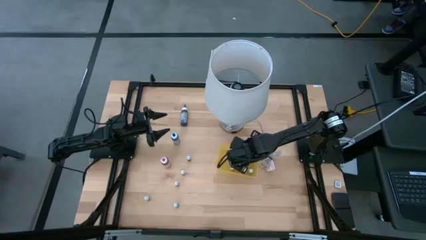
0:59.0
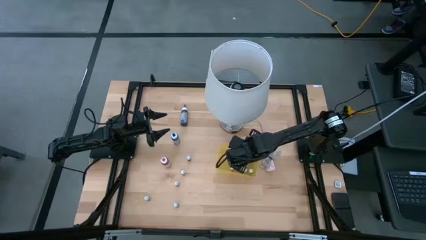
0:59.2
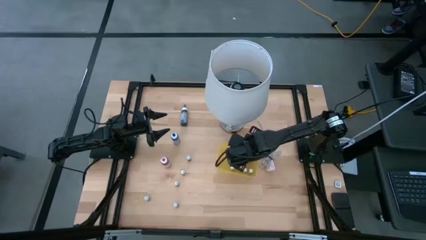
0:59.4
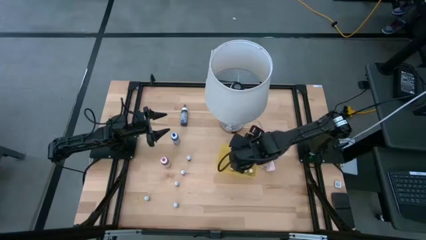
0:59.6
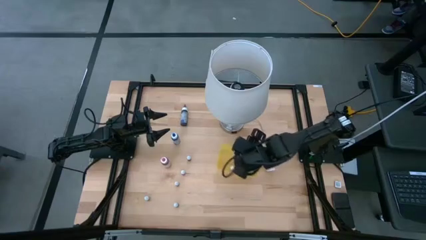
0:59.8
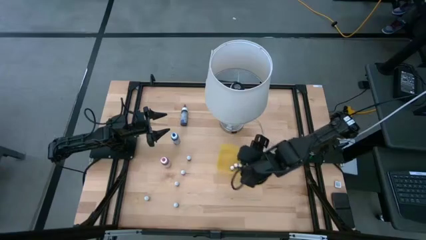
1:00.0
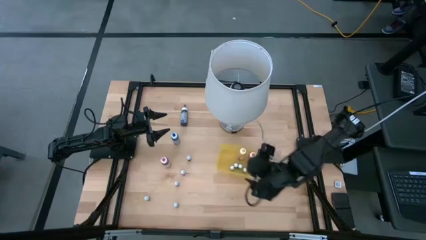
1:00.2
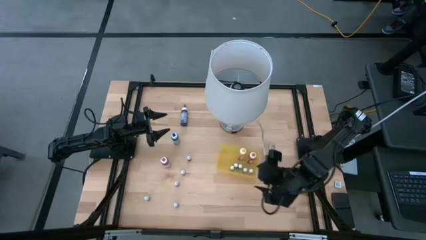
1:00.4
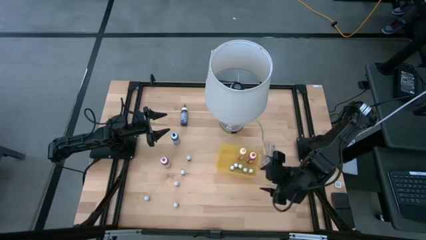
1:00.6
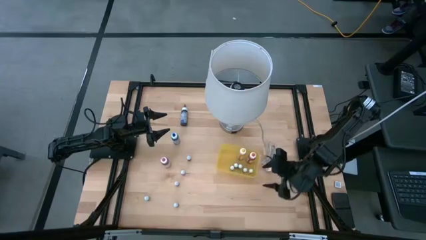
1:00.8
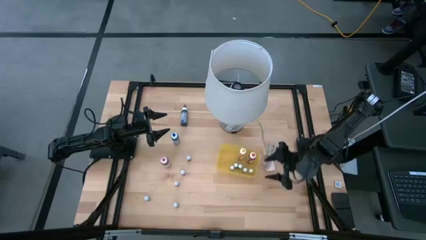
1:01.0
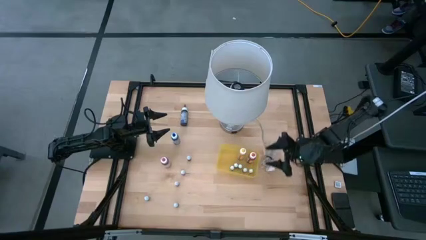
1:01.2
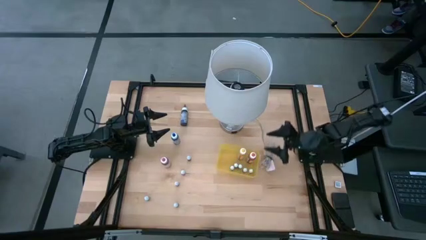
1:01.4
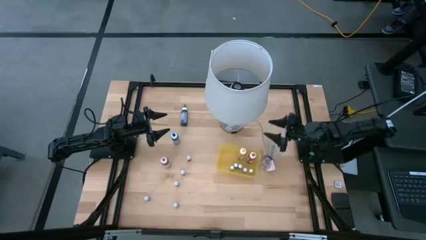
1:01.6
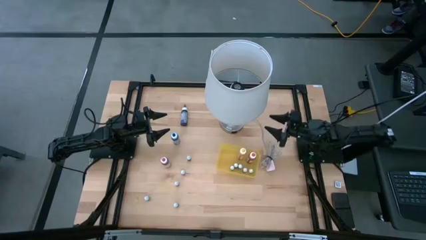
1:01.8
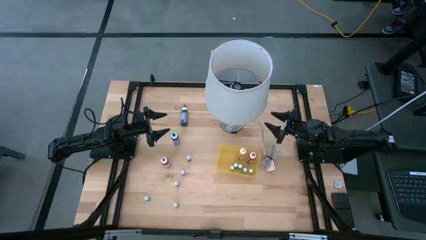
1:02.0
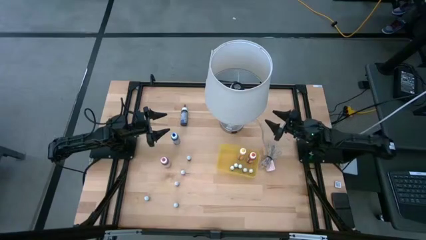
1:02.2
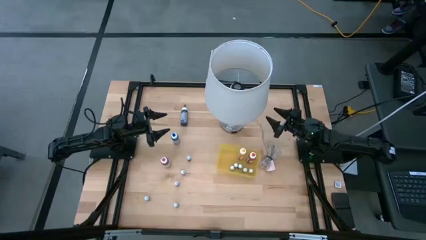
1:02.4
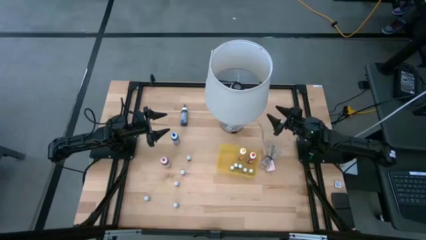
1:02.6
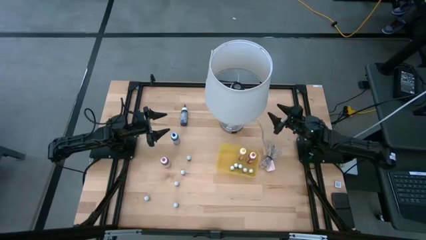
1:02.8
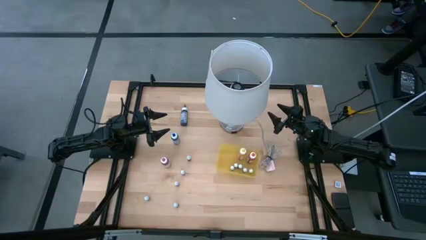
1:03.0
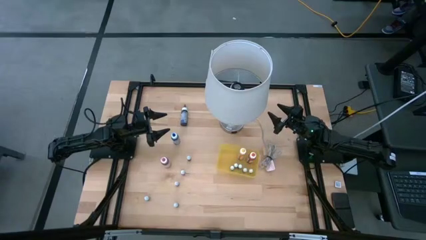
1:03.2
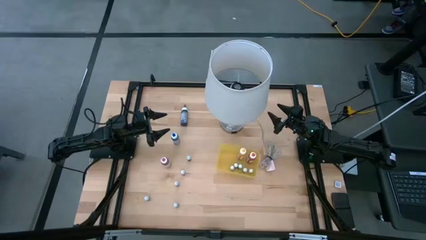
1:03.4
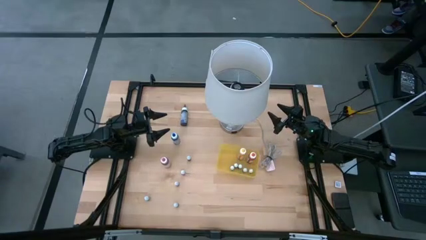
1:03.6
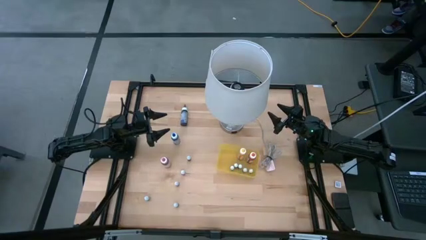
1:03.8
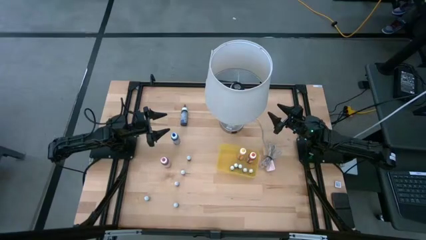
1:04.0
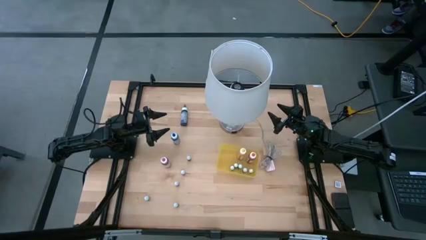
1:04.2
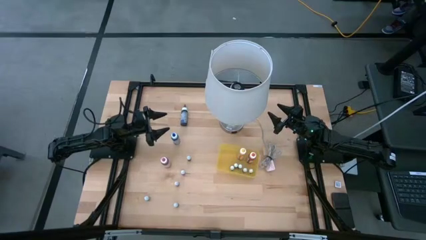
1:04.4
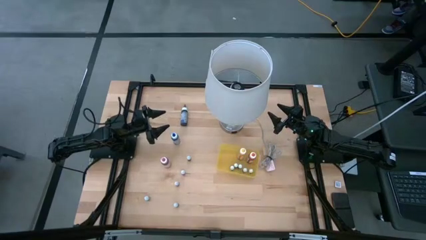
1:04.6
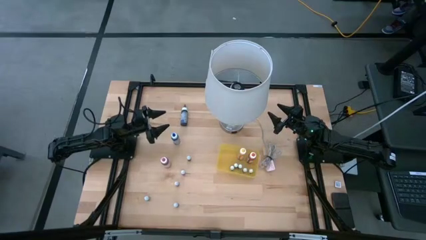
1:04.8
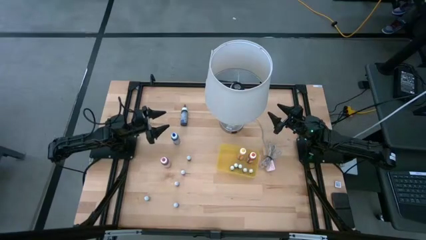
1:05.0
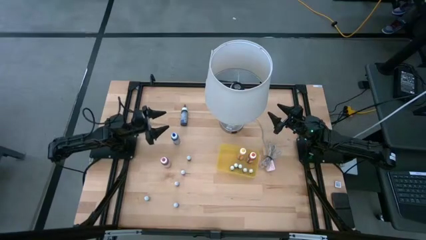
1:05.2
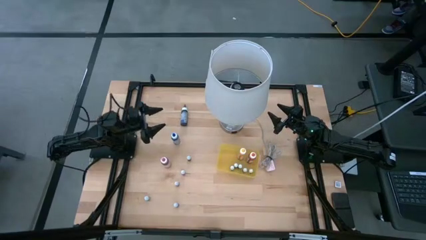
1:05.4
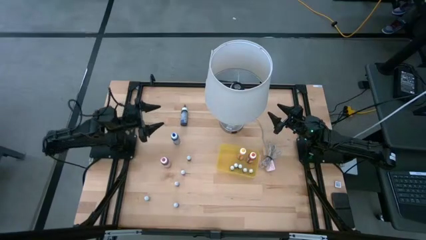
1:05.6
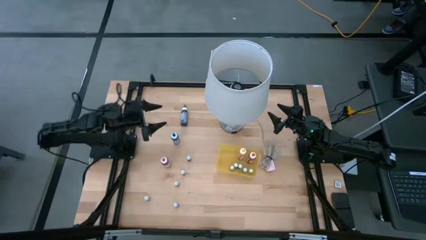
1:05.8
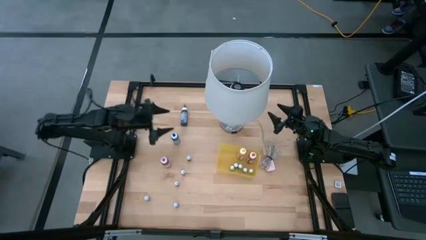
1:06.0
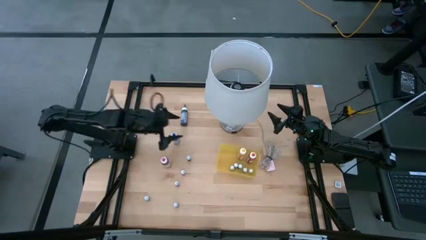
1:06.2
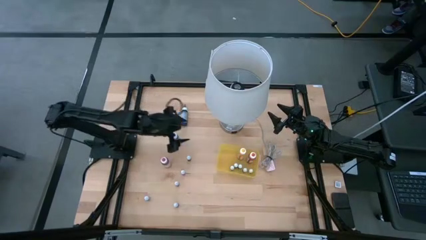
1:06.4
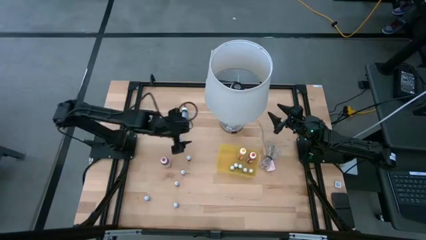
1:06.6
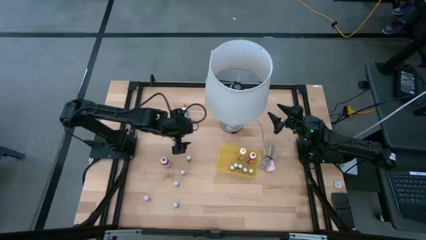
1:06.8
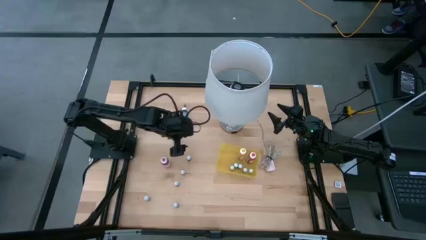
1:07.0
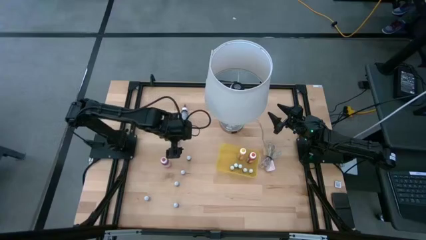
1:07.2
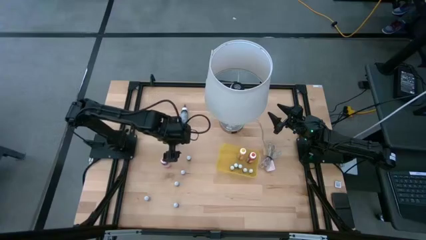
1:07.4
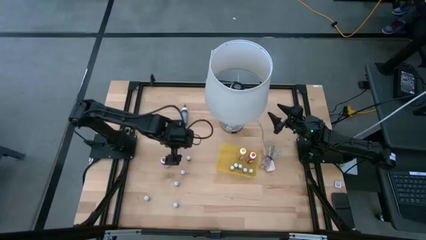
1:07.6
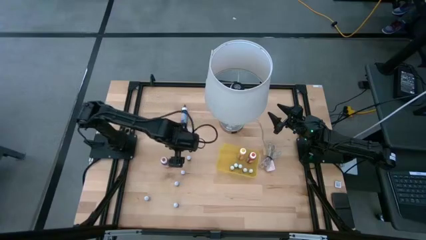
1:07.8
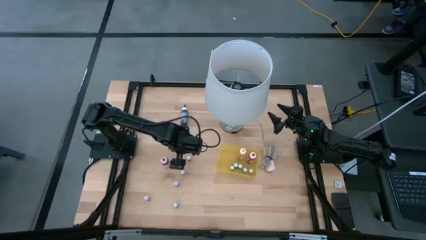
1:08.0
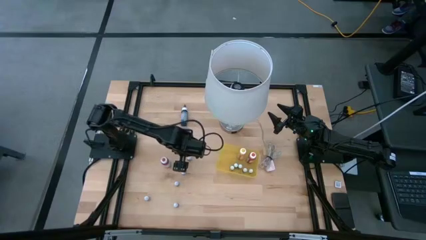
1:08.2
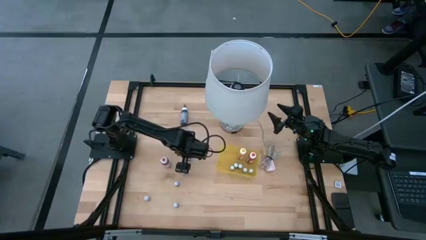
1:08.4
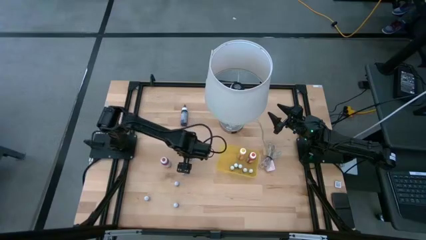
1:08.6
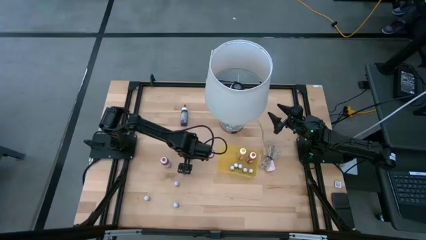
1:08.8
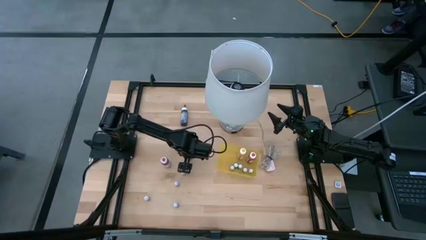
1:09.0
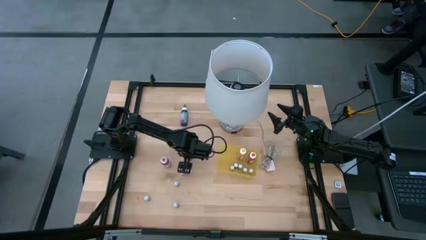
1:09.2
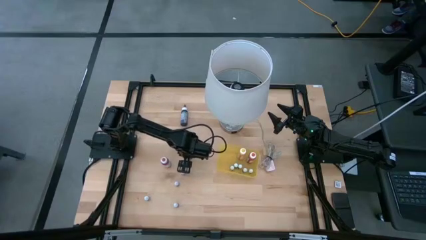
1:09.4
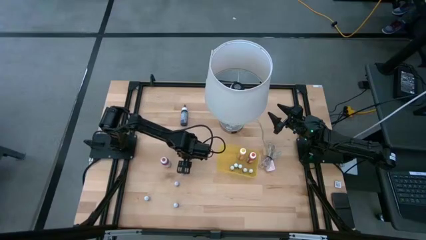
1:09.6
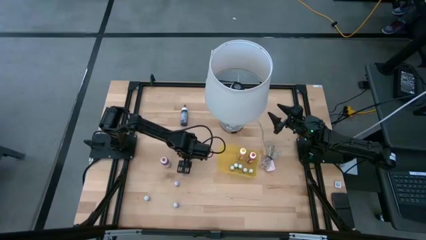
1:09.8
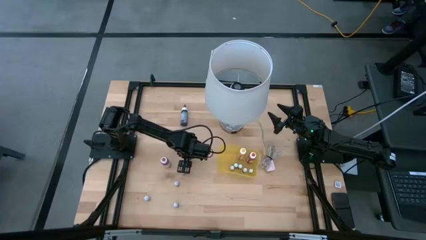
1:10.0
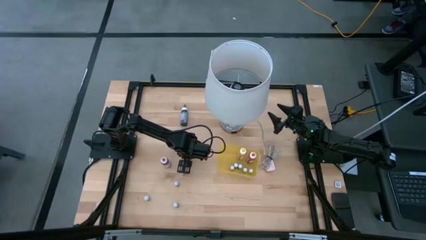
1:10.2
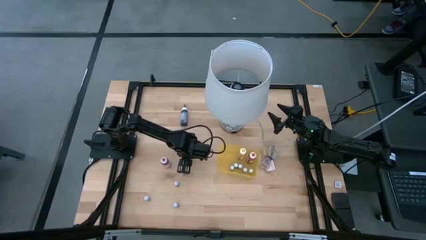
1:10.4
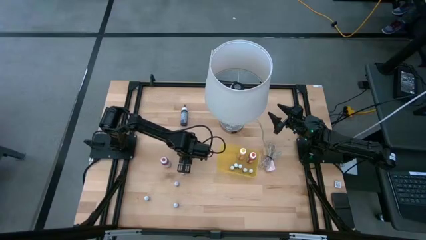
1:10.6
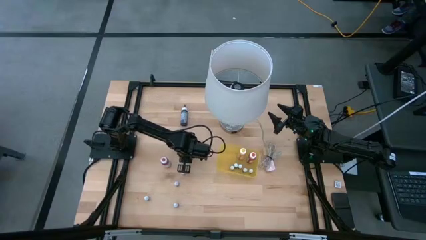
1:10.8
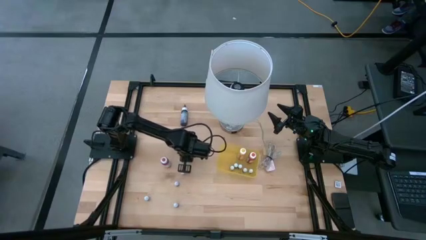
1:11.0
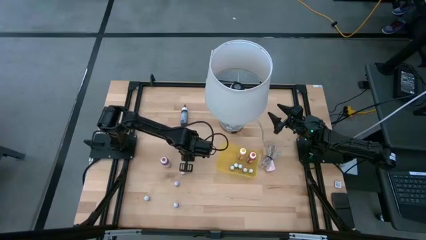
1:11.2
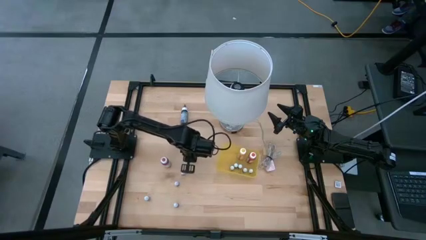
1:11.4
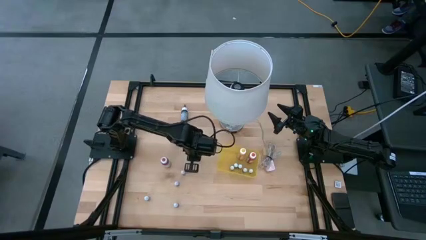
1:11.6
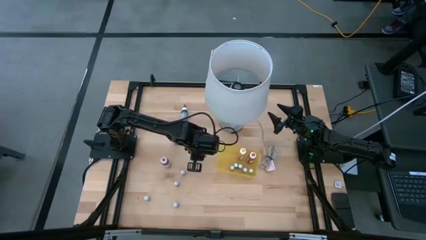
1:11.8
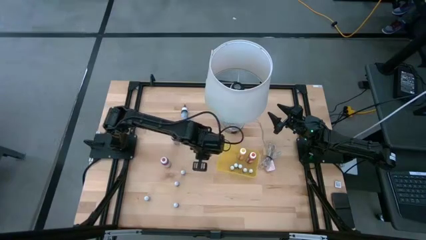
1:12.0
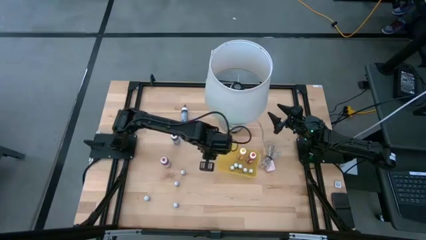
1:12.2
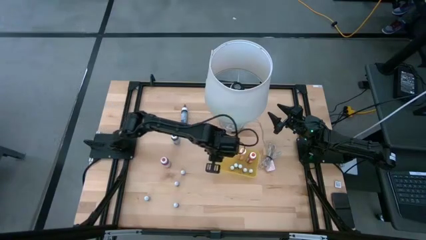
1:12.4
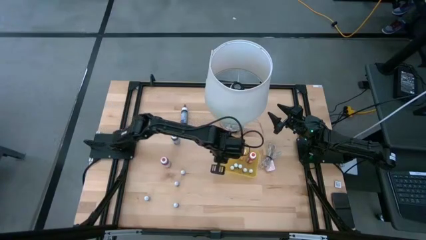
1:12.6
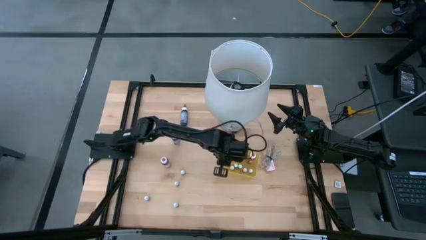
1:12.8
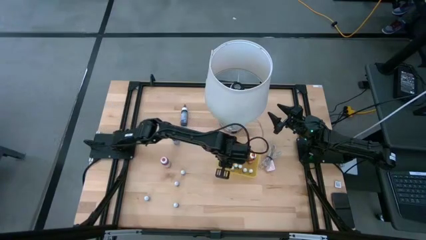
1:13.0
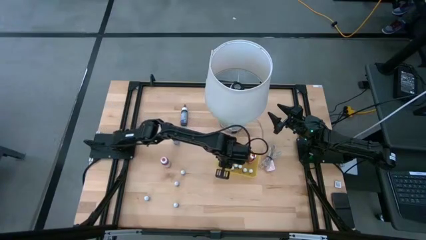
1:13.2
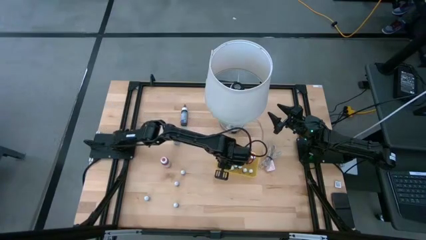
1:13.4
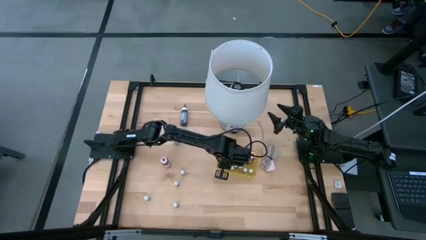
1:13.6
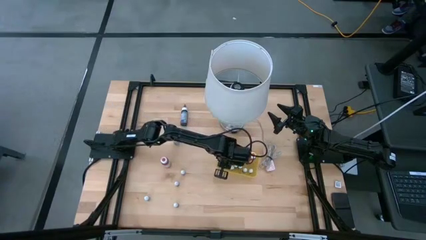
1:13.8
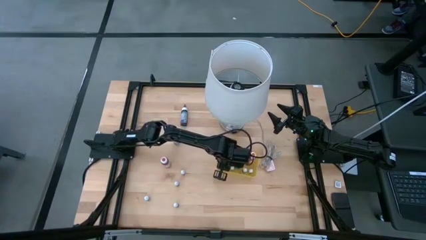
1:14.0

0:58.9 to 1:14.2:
Task: Pick & Place food coloring
Put the red food coloring bottle into the yellow bin

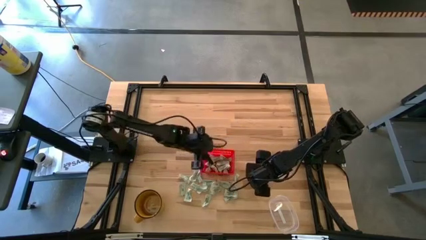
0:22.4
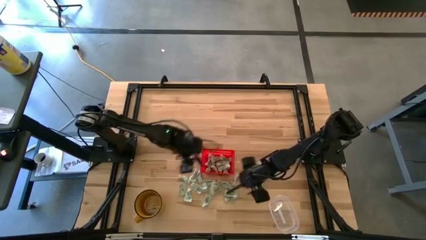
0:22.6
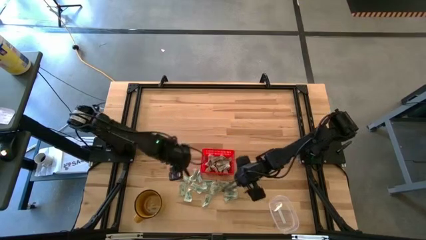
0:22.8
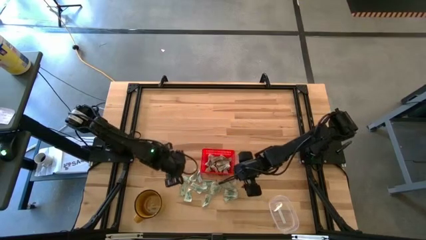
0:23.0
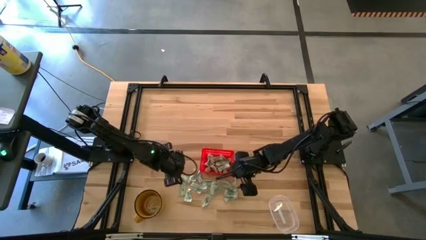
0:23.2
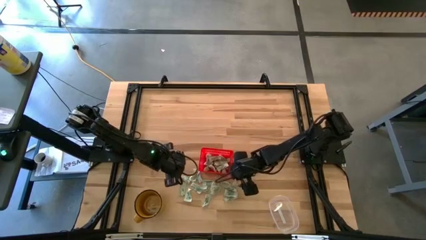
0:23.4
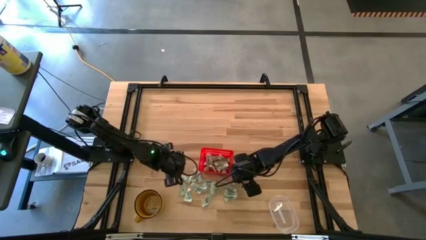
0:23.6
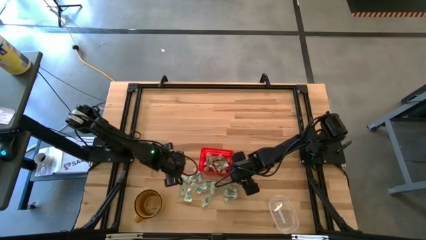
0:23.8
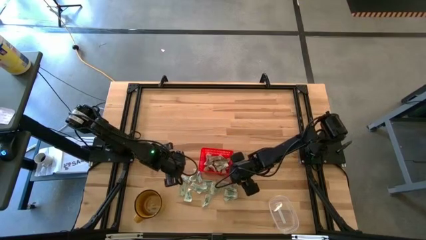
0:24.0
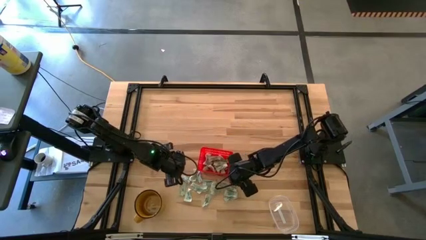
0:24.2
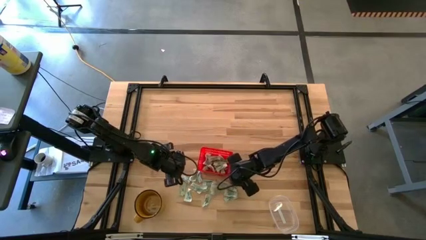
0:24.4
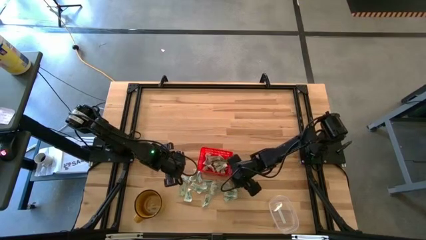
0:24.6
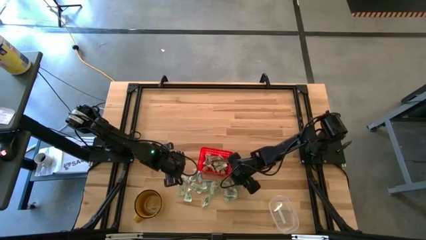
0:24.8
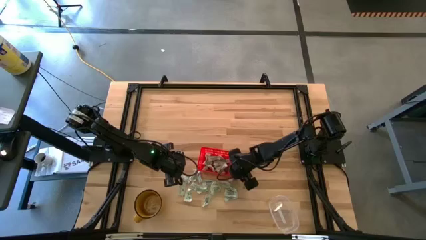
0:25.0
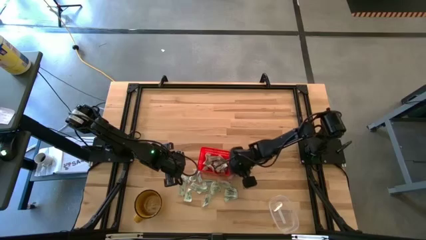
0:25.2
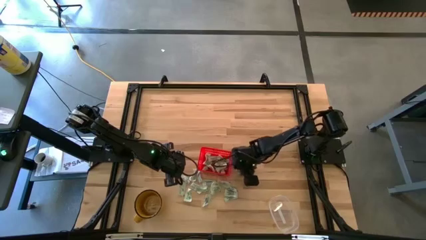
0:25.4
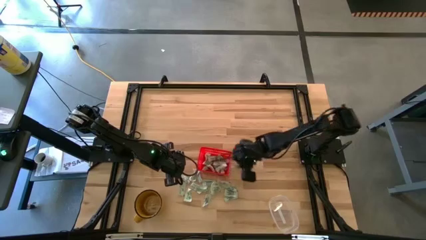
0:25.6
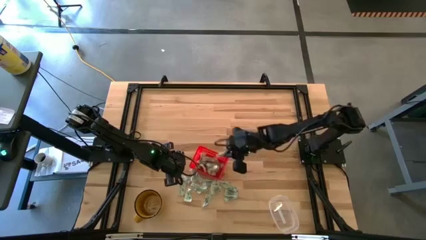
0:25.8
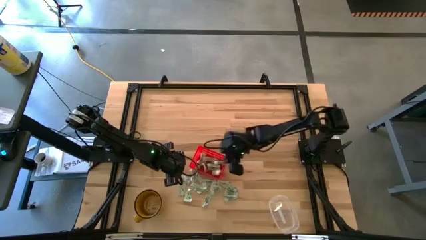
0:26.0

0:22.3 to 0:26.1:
Task: Pick and place Stevia / Truvia into bins
Put the stevia packet into the orange basket
